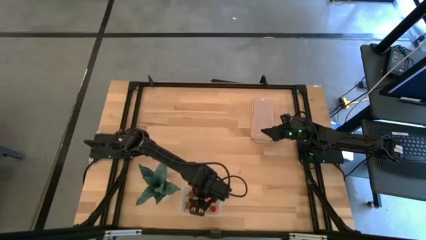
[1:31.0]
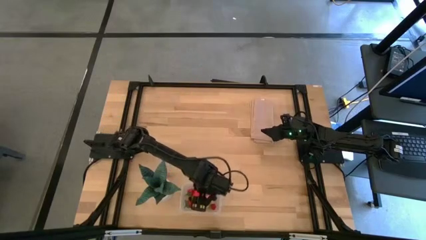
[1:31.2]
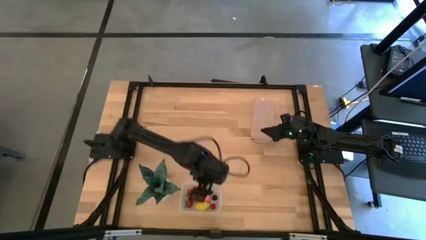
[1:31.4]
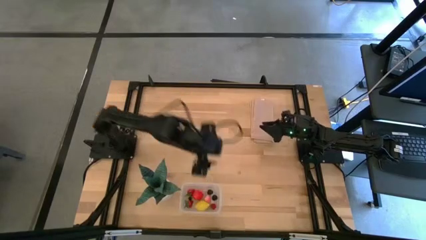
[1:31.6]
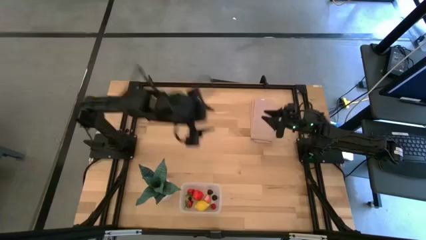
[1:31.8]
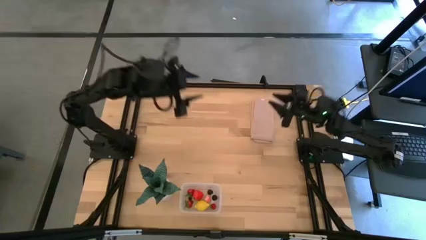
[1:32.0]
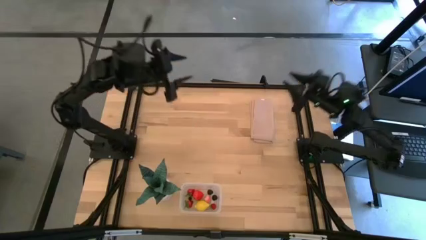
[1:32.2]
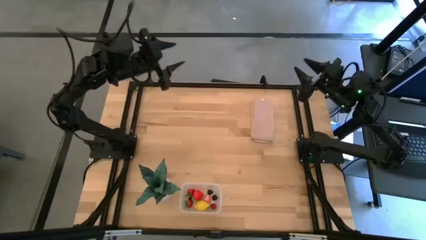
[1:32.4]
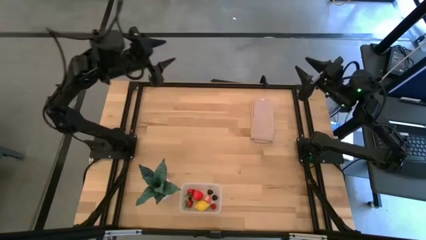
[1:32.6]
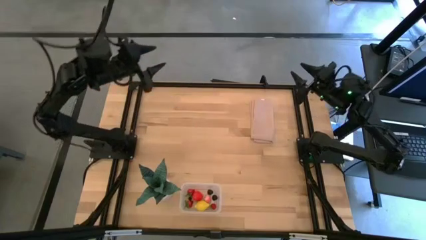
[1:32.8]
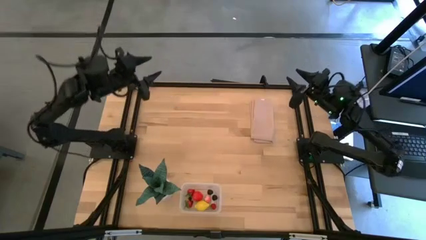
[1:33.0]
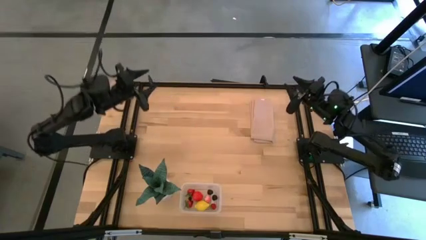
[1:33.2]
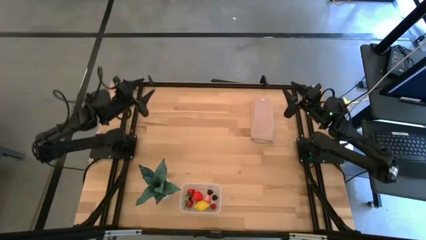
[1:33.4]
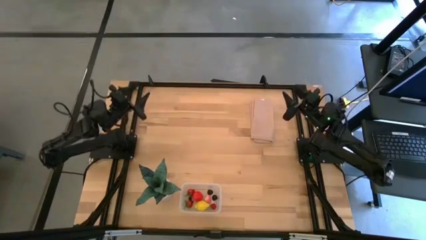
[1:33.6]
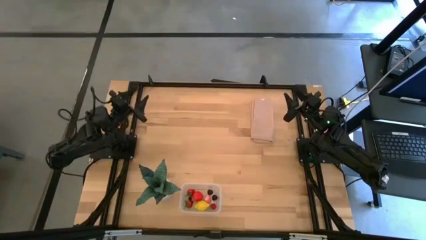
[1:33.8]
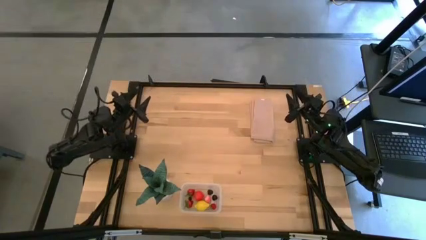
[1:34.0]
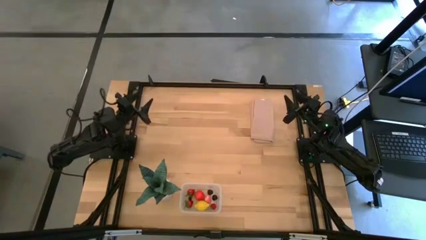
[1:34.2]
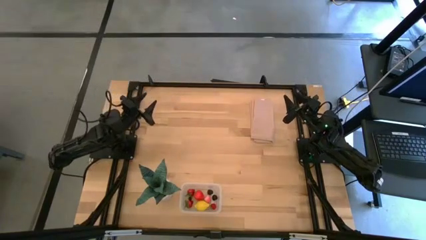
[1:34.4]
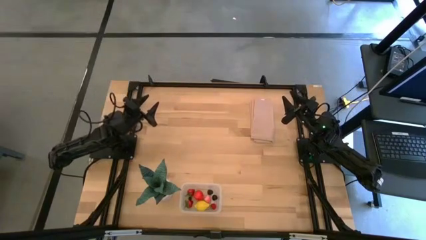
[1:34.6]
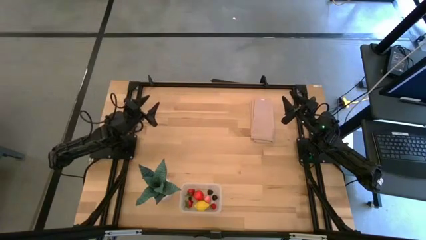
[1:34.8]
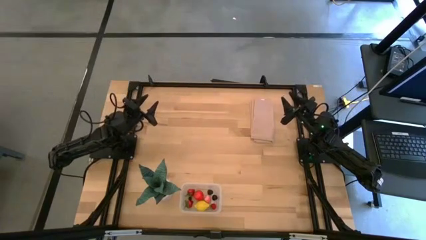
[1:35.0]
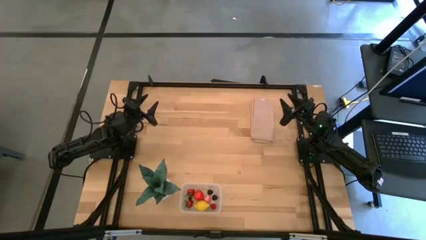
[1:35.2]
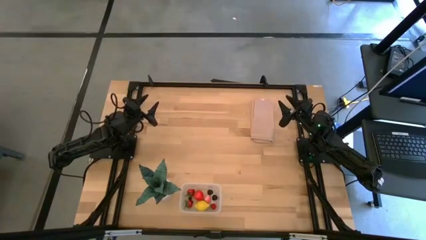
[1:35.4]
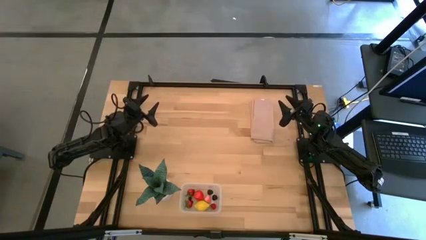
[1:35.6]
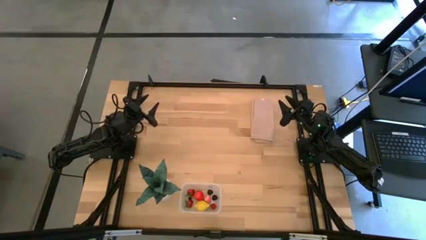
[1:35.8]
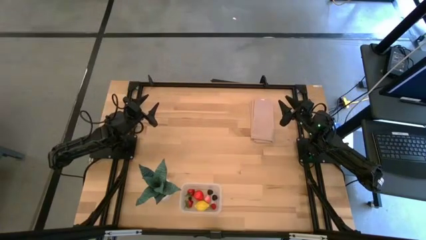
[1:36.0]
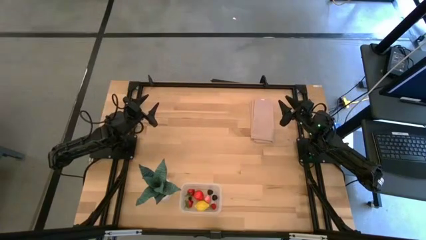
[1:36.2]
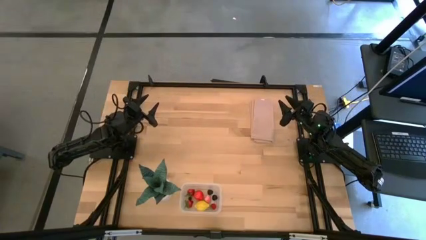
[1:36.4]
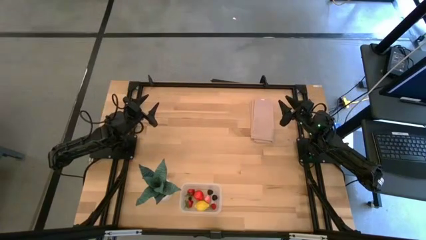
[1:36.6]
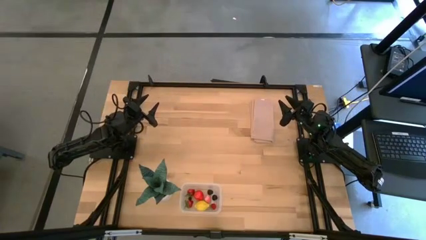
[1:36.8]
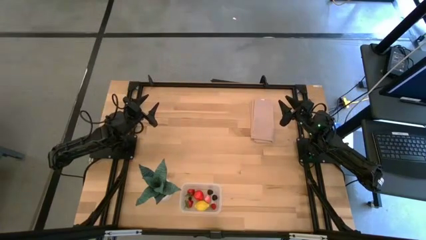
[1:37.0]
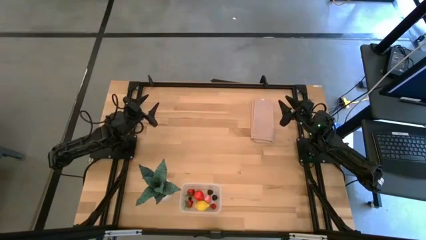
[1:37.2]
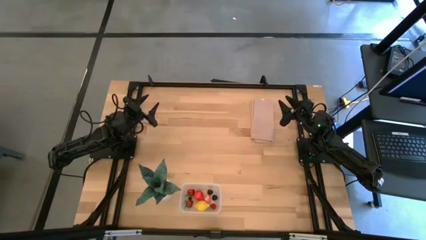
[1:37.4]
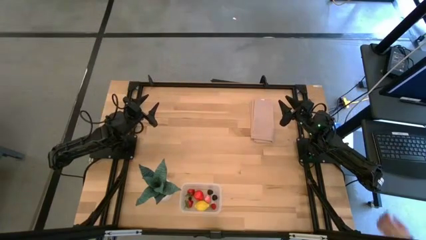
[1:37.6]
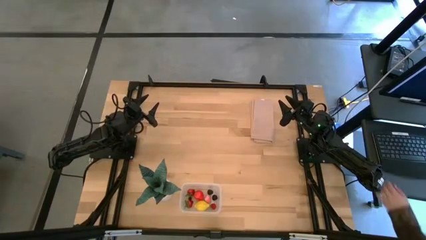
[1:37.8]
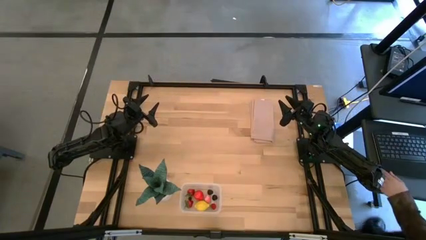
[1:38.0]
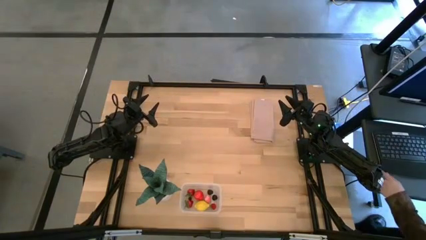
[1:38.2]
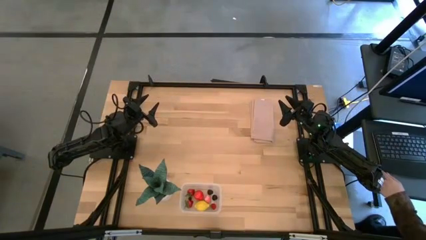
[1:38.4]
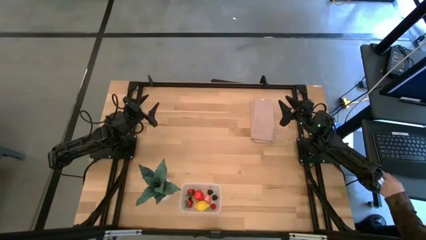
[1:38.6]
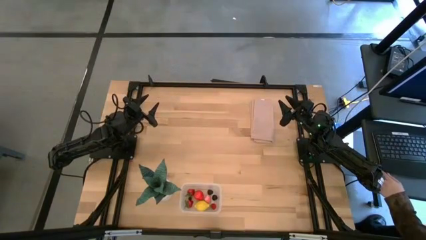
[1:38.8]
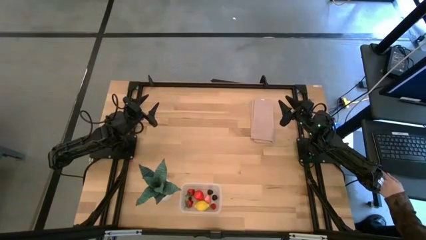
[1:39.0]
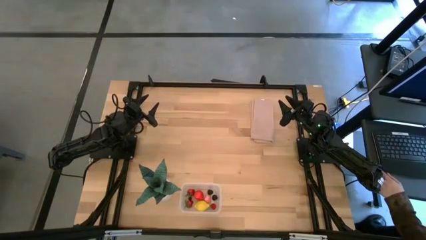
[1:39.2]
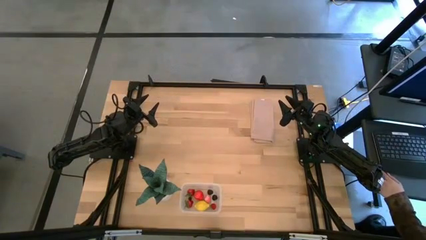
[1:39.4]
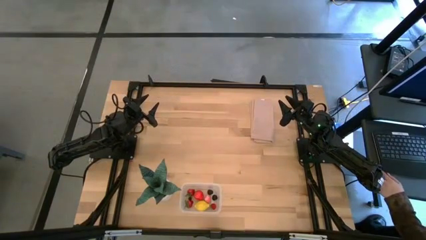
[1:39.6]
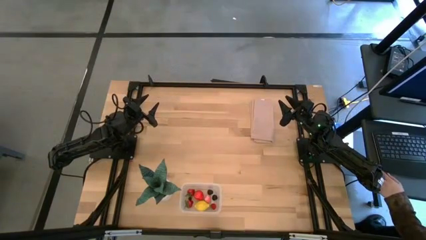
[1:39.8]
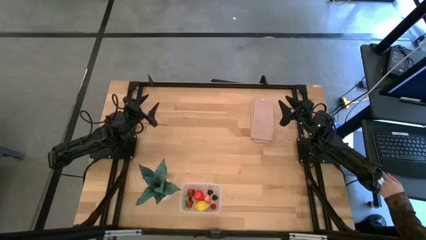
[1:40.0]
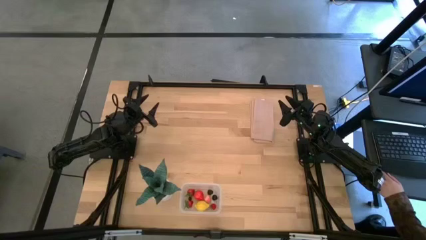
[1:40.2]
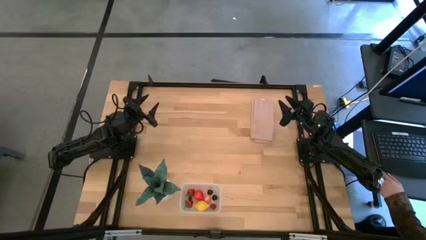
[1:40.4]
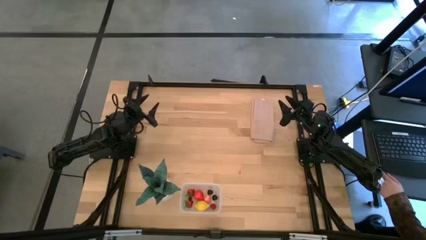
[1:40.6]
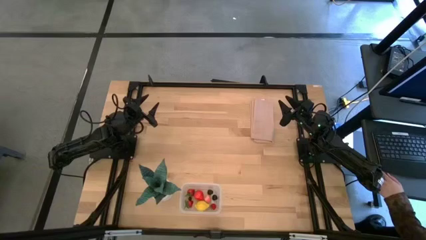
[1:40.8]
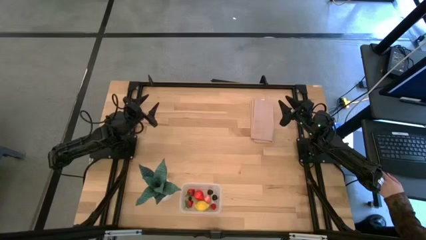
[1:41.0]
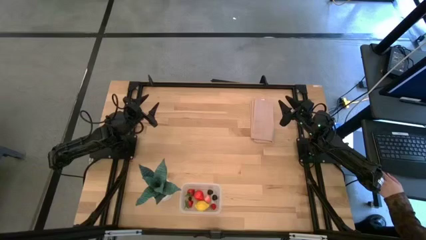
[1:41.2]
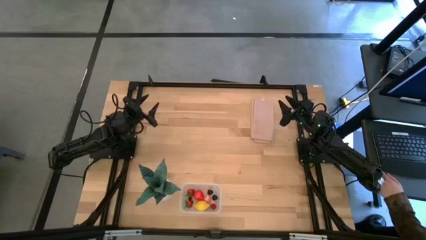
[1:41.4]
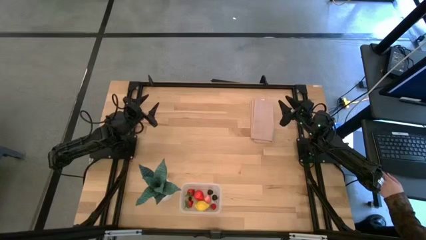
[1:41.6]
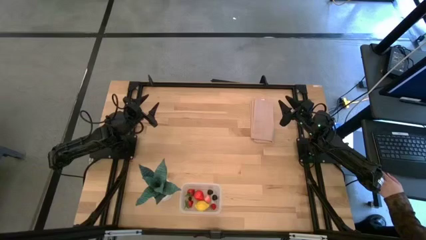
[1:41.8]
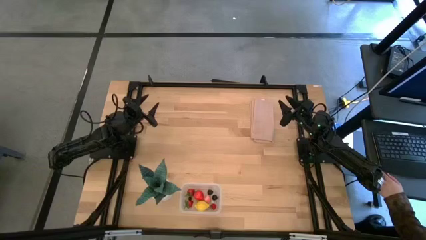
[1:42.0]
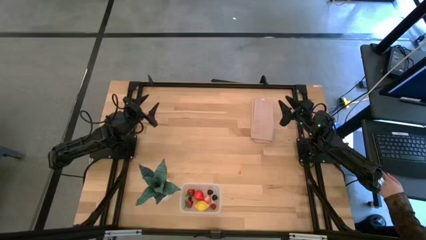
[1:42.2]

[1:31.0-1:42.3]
Task: Pick and placing Produce into tupperware
Return to Home Position
